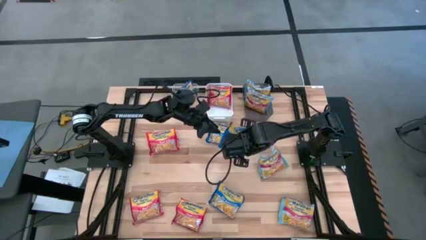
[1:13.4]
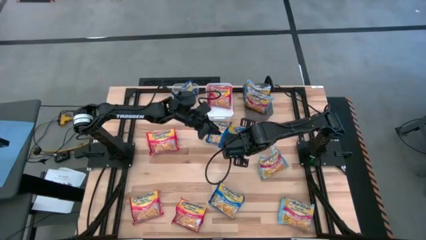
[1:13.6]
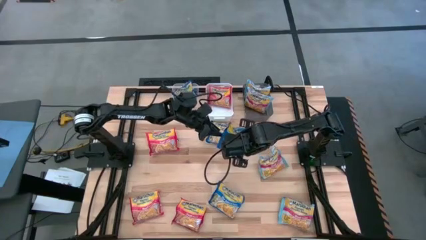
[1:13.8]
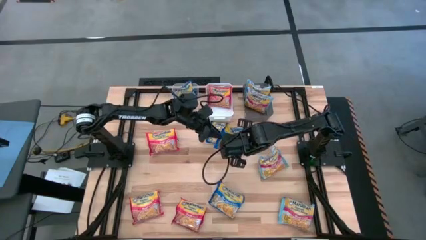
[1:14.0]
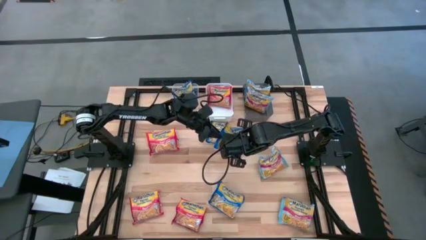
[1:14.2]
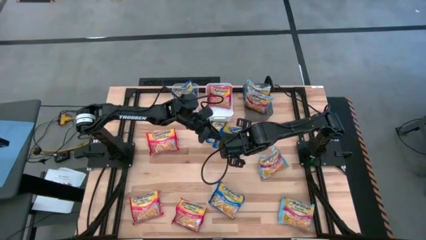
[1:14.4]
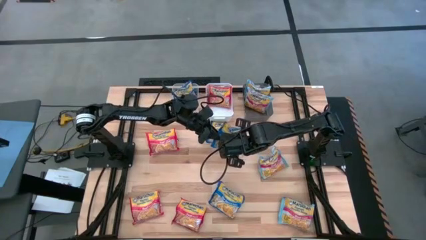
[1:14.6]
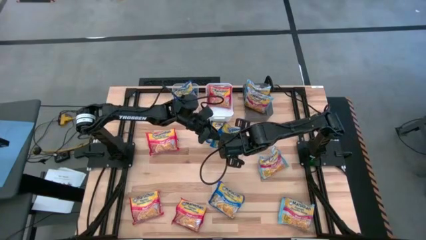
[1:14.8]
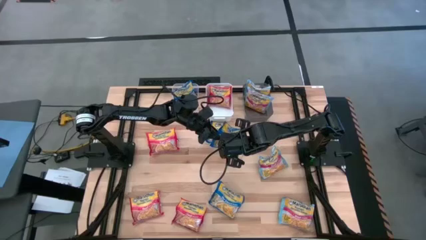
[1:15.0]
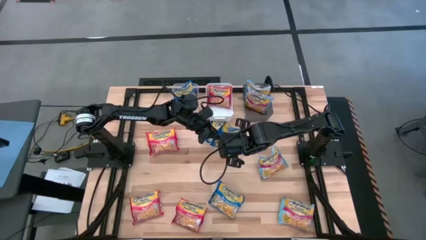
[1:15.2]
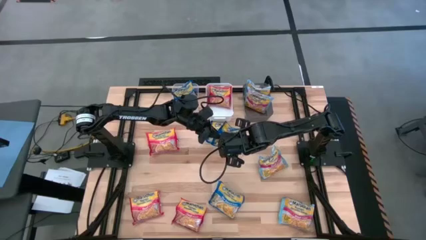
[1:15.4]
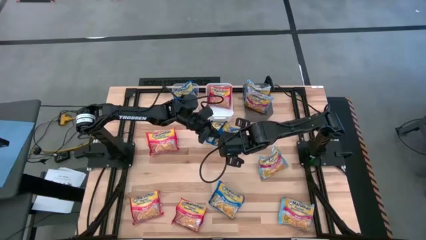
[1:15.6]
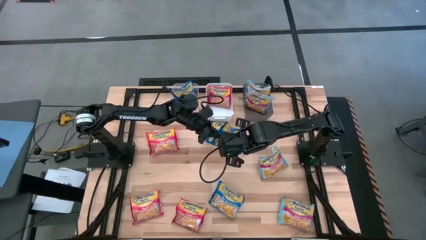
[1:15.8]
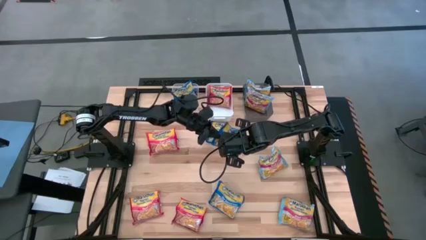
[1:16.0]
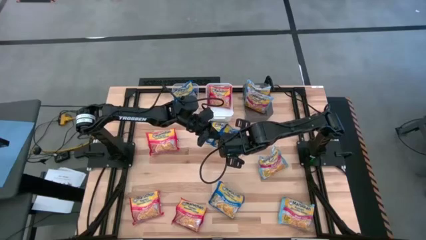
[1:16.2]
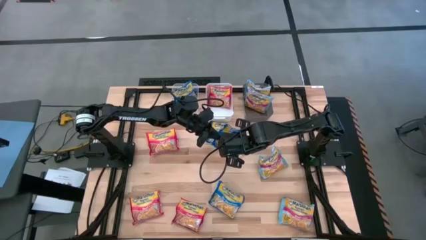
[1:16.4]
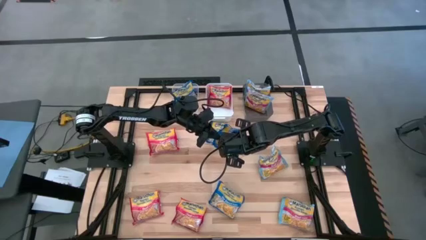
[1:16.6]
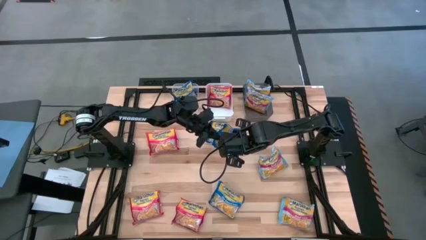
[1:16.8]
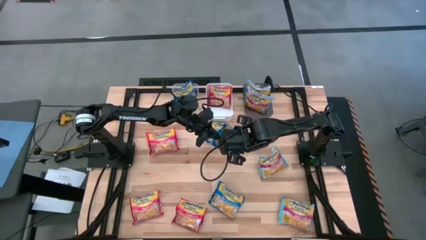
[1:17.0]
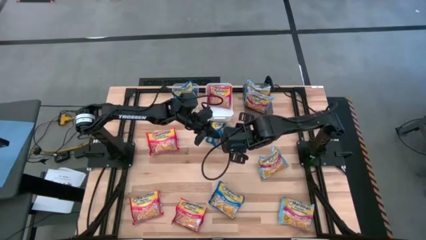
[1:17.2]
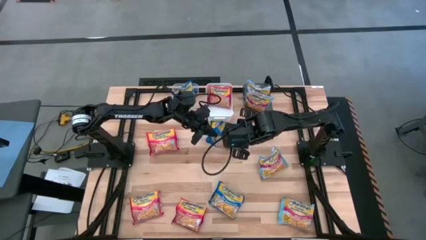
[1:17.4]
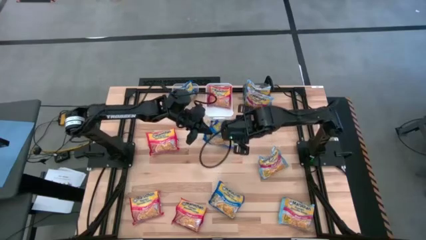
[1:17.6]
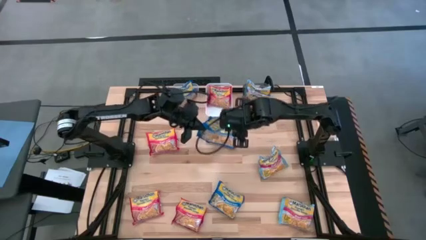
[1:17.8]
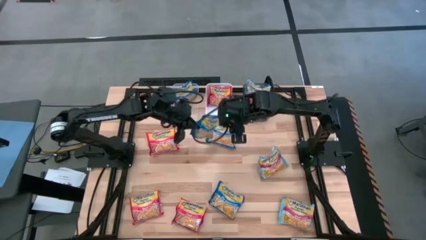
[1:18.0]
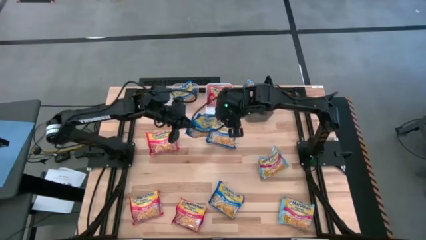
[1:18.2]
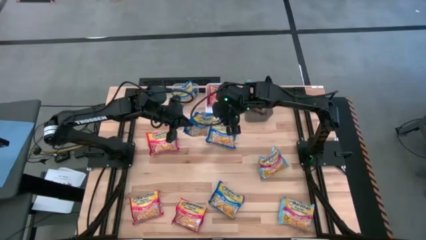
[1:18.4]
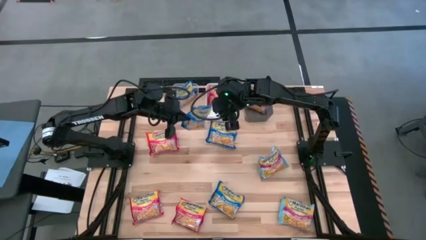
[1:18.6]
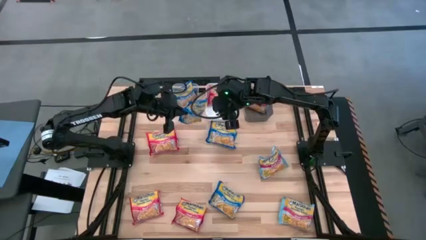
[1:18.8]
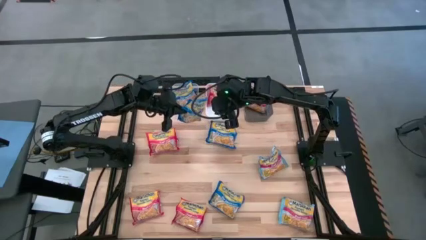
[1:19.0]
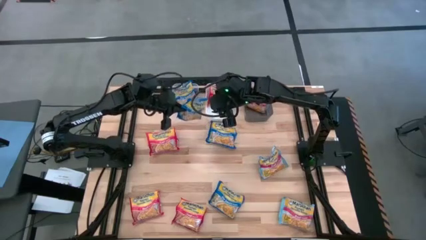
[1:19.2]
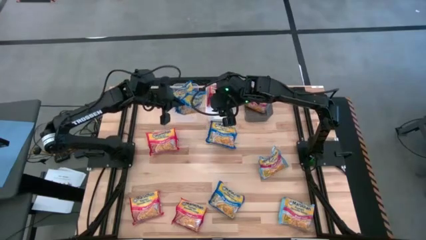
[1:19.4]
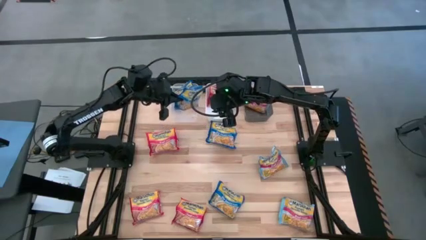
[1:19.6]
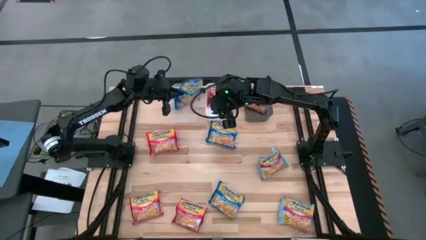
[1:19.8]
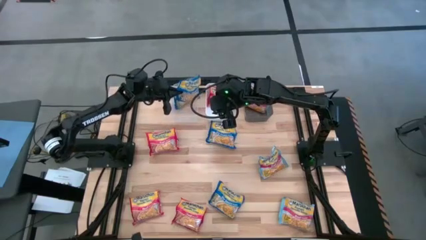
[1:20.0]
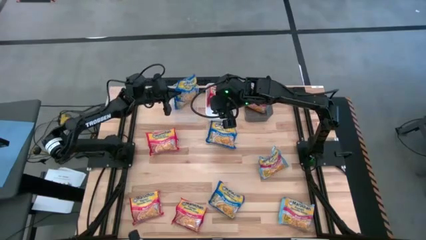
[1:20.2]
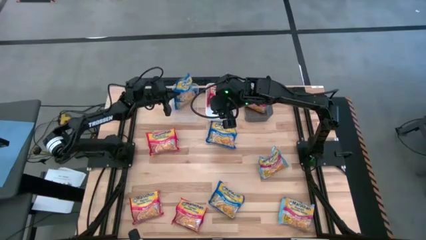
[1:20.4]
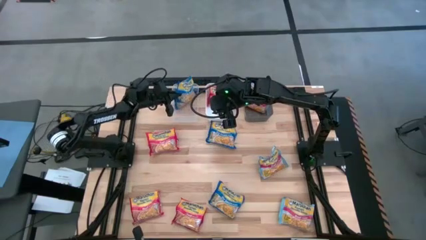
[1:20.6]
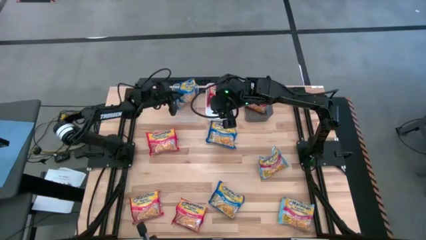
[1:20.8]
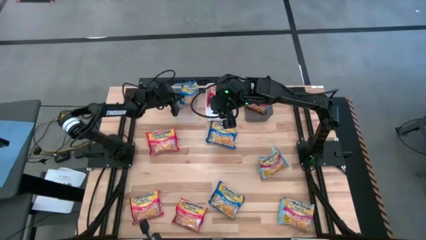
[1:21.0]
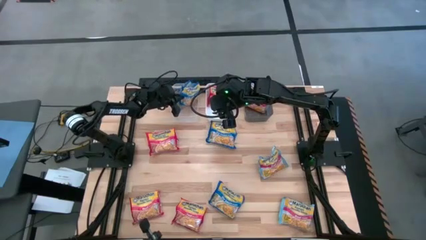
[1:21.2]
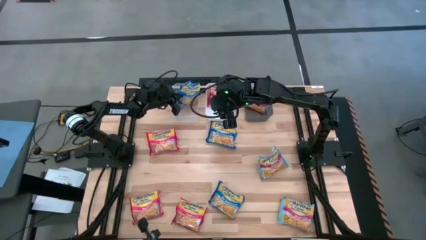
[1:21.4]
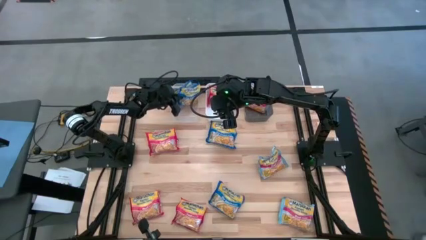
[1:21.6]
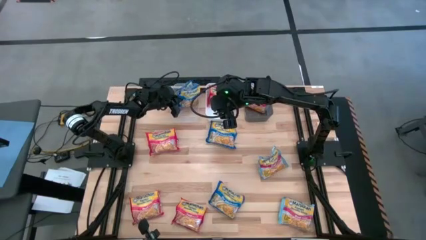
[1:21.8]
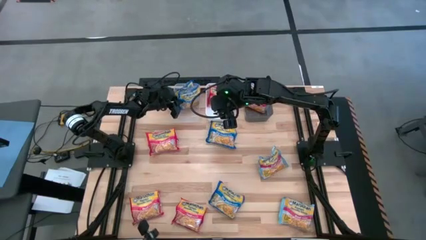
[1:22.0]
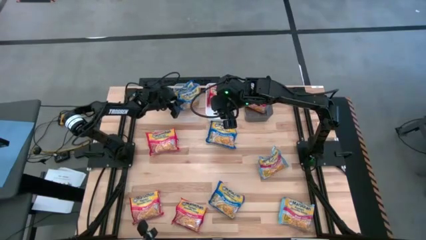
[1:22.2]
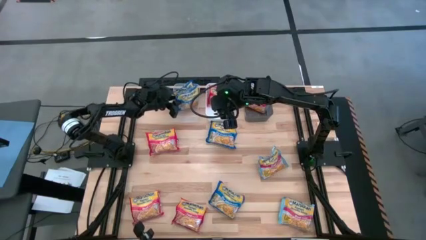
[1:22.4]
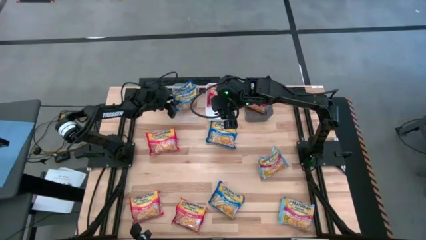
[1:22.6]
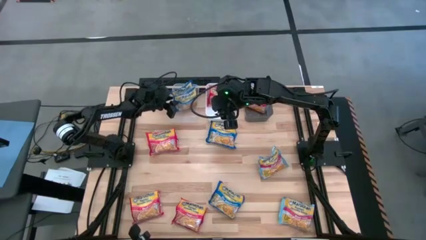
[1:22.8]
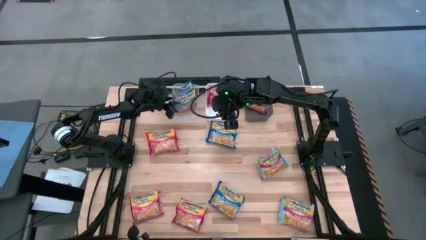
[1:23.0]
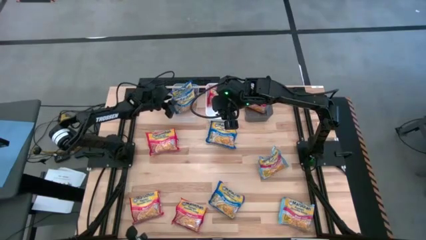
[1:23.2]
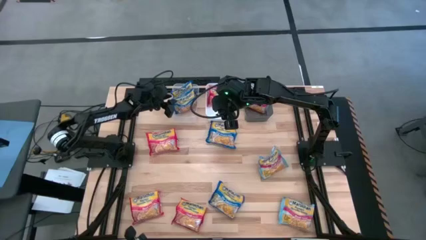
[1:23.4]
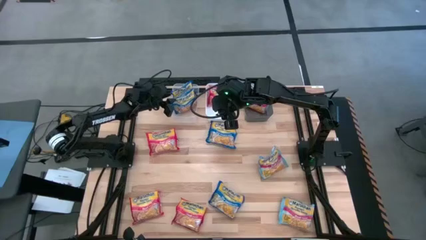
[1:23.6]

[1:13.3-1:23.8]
Task: Sort Maruchan noodles
Put the blue noodle pack into the transparent bin

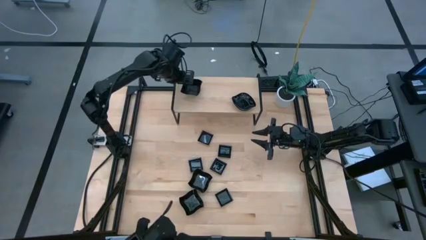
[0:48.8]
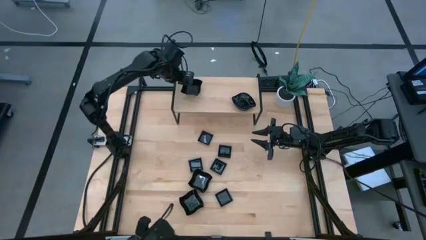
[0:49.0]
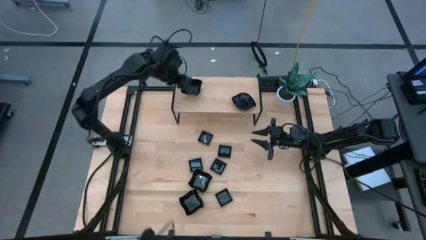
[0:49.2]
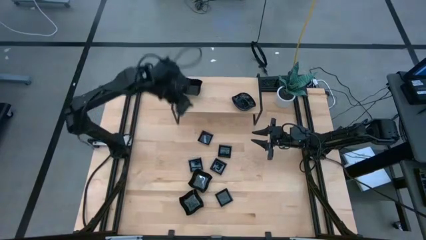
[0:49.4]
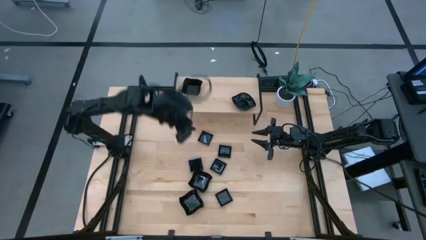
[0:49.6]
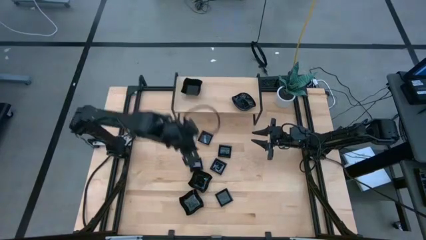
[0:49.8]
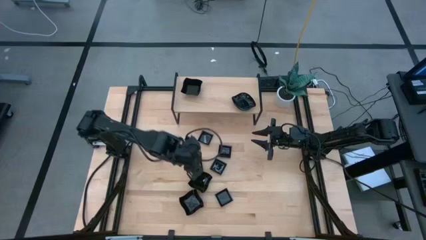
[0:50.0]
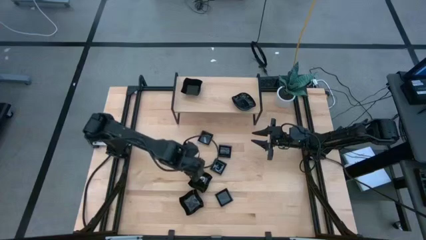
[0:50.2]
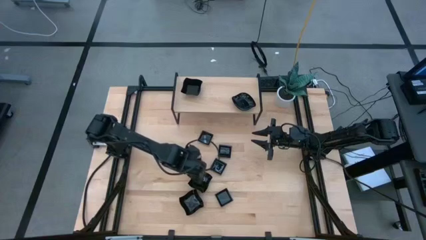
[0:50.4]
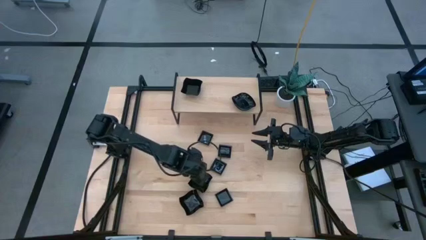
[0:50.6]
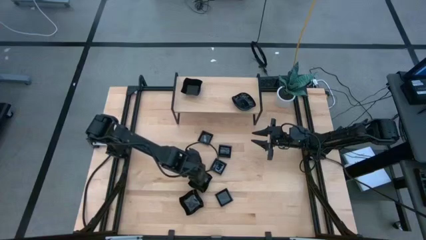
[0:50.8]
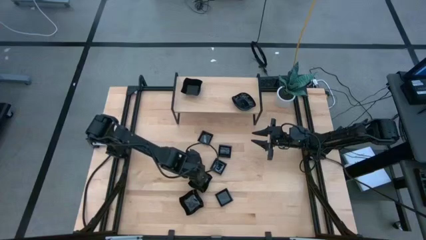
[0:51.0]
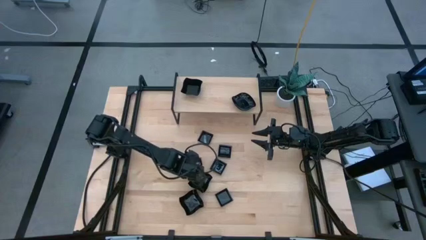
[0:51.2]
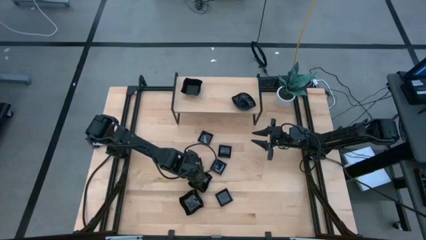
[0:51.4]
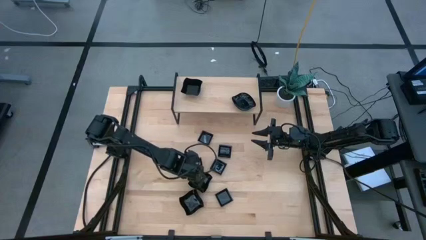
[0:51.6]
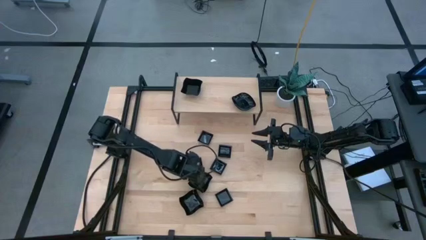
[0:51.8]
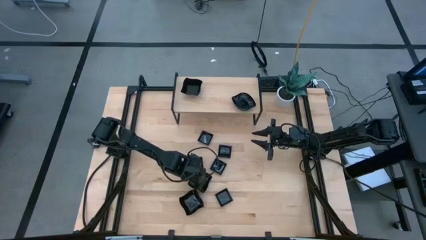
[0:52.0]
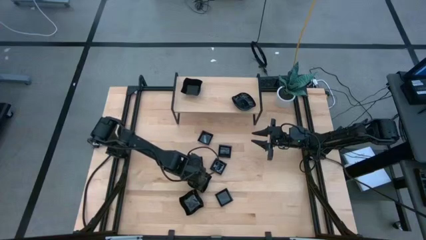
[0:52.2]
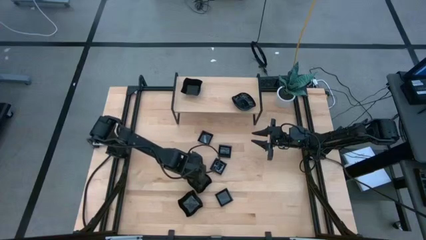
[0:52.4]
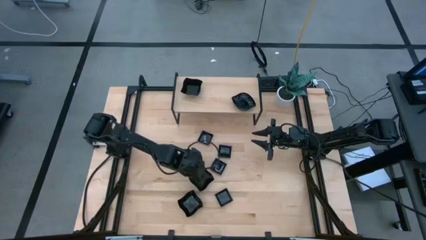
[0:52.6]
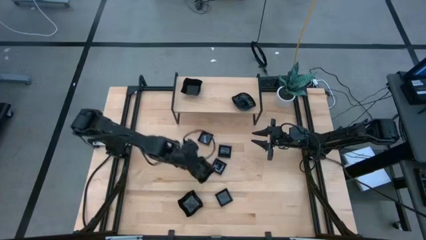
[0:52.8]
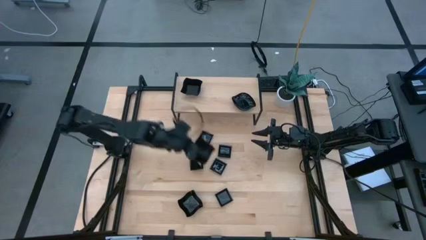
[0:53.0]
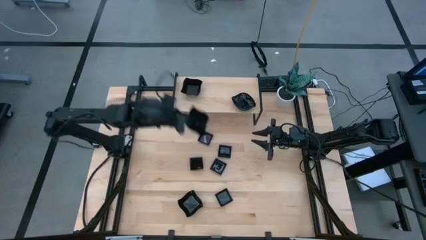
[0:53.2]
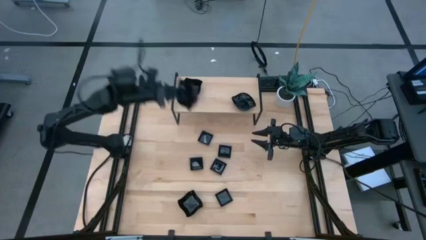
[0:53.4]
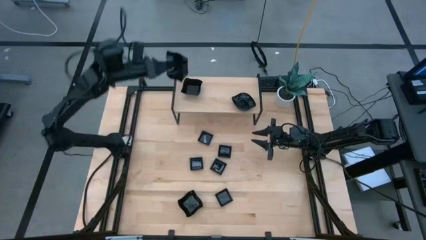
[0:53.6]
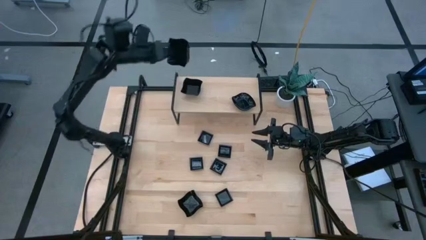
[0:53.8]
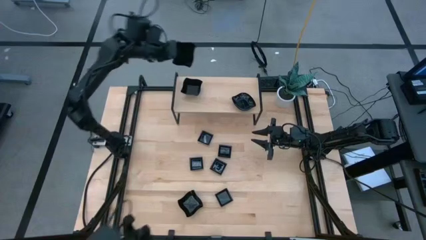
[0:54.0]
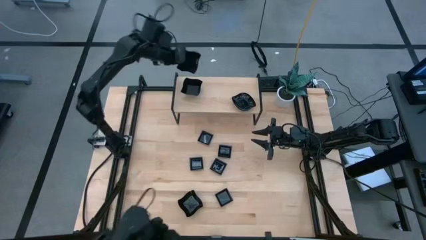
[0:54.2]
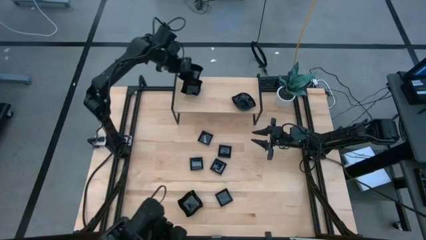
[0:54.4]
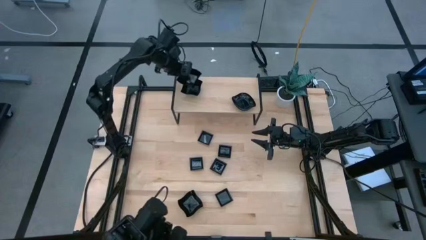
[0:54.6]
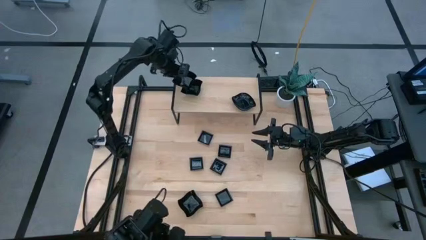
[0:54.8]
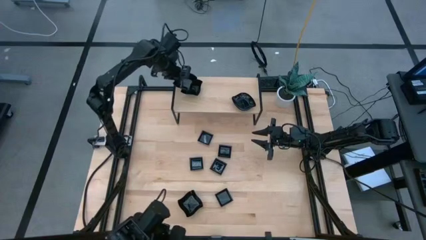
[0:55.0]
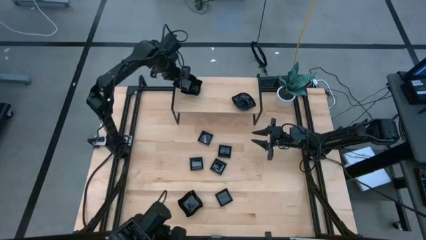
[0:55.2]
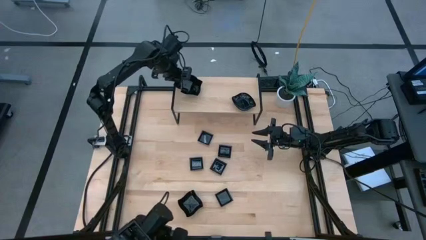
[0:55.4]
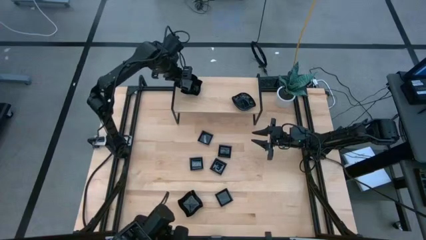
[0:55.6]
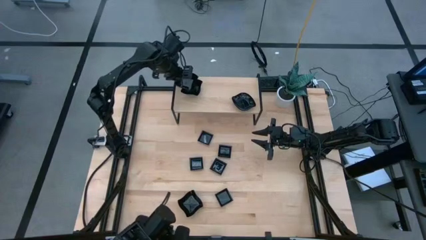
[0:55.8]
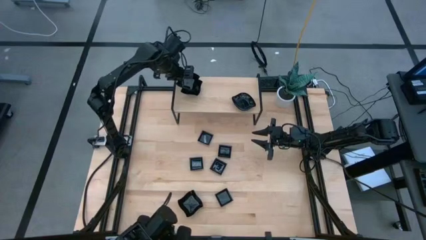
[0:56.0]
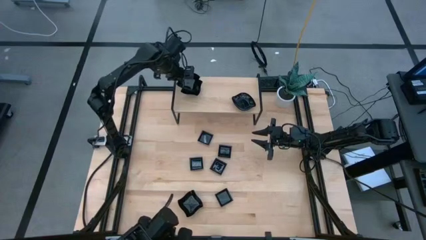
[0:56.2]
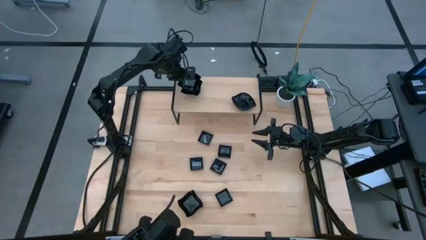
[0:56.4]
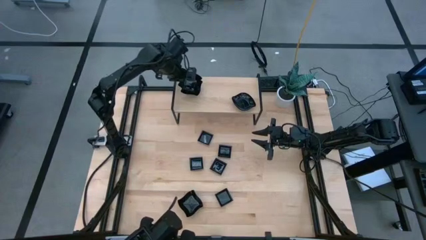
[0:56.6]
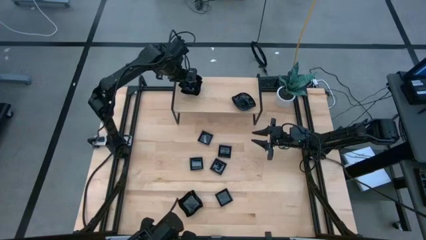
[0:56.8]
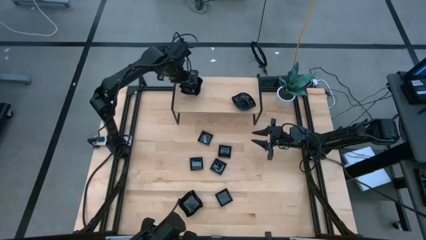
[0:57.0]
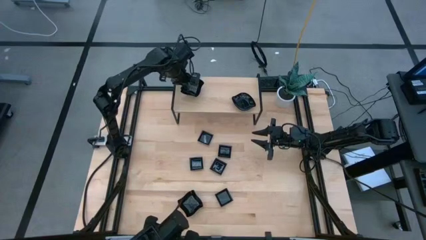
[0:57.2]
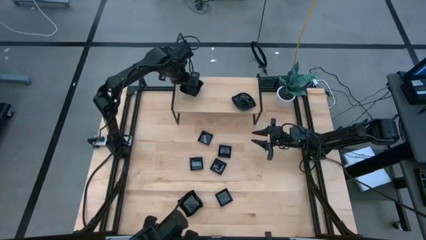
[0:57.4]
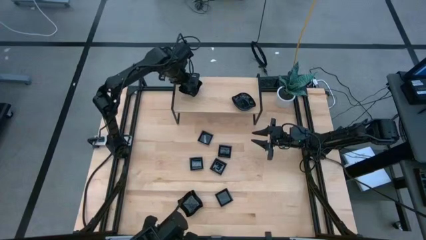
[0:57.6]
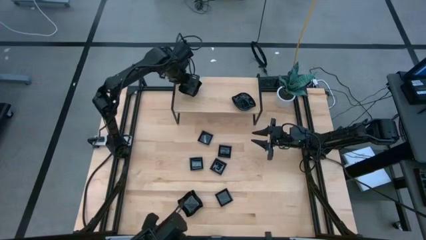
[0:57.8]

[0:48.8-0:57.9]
Task: Pick & Place Mini shaped plates
Stack the top distorted square plate on top of the other distorted square plates on the shelf
